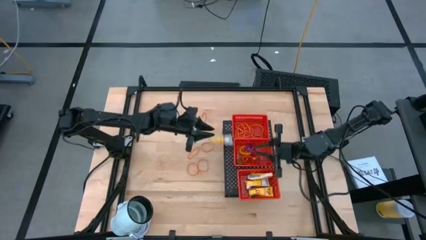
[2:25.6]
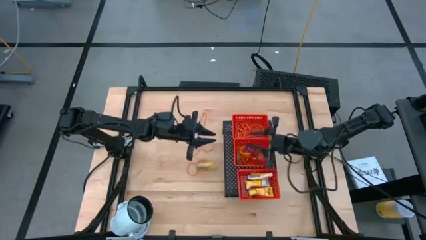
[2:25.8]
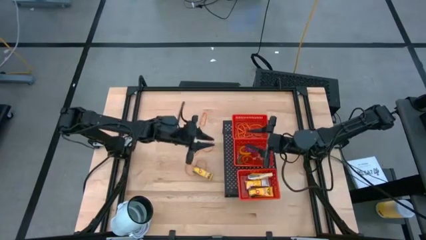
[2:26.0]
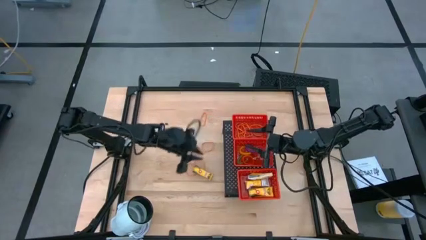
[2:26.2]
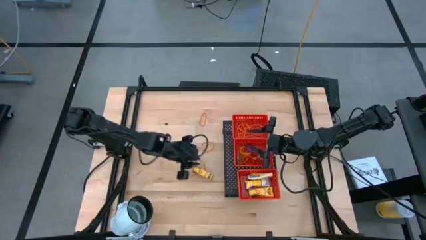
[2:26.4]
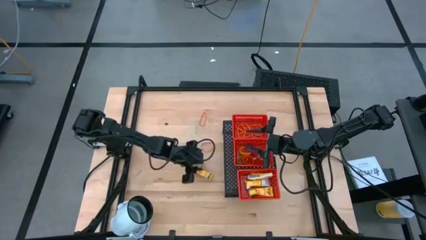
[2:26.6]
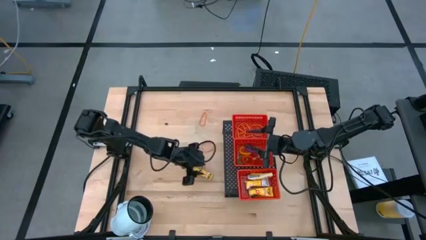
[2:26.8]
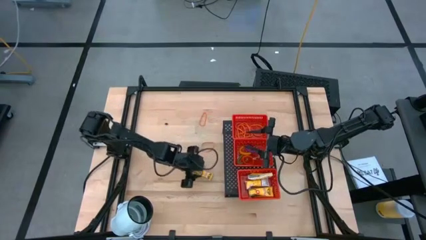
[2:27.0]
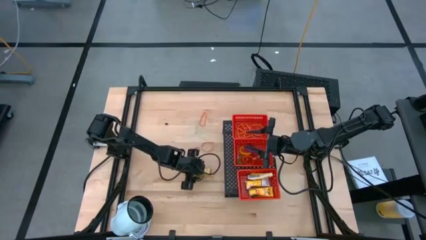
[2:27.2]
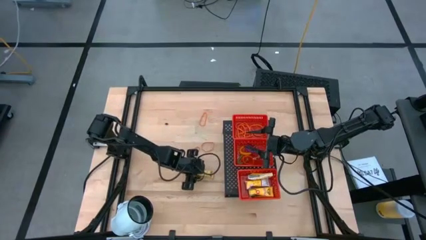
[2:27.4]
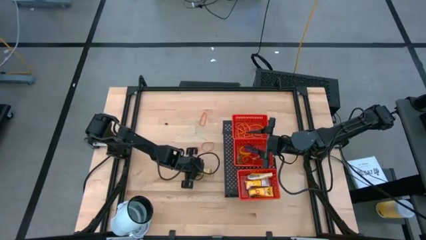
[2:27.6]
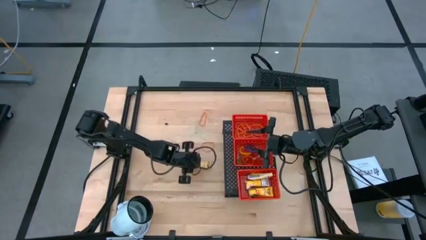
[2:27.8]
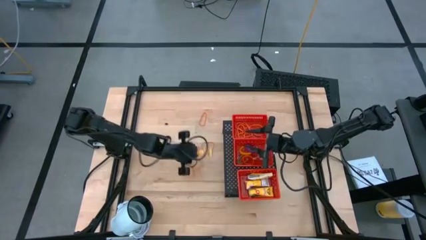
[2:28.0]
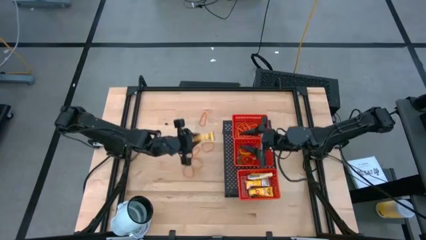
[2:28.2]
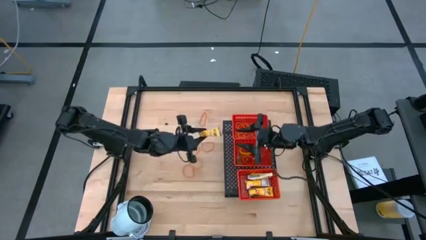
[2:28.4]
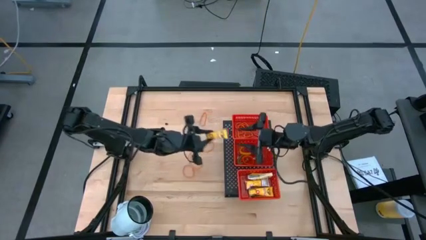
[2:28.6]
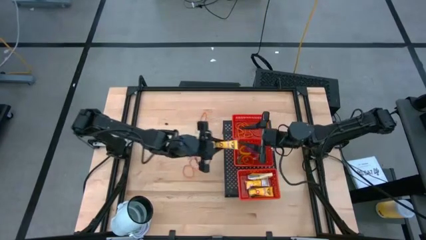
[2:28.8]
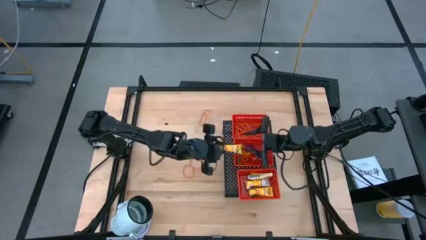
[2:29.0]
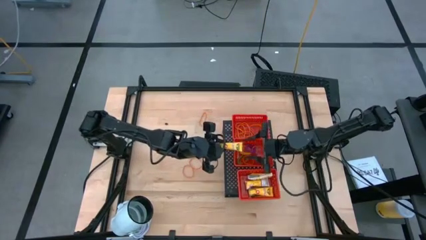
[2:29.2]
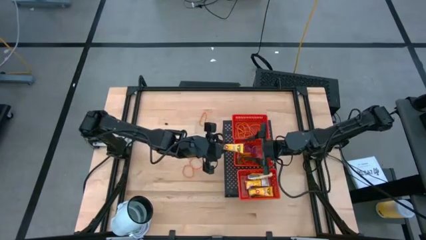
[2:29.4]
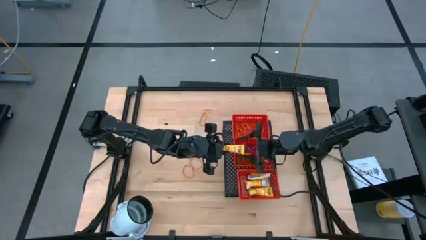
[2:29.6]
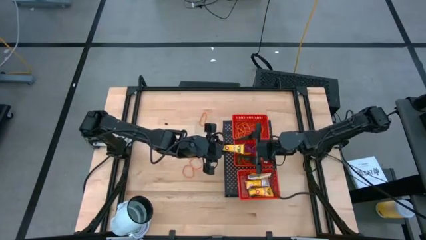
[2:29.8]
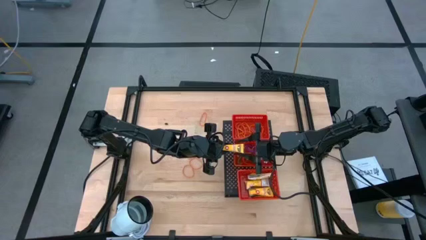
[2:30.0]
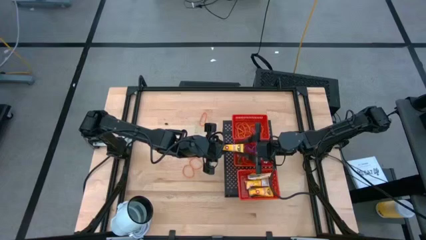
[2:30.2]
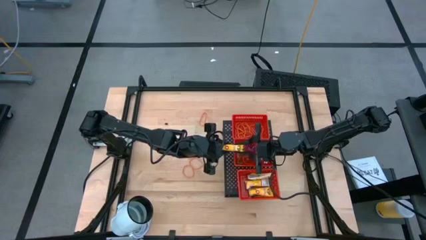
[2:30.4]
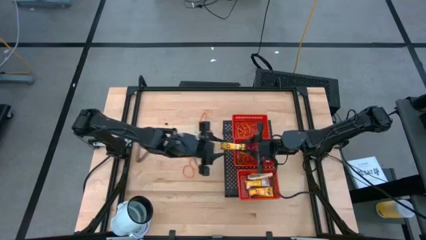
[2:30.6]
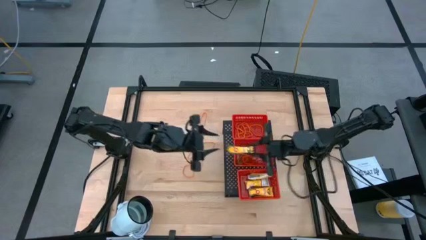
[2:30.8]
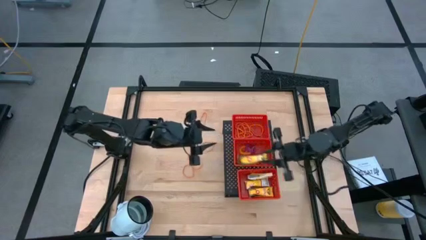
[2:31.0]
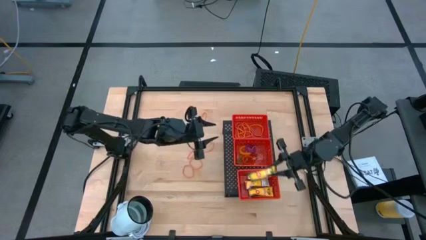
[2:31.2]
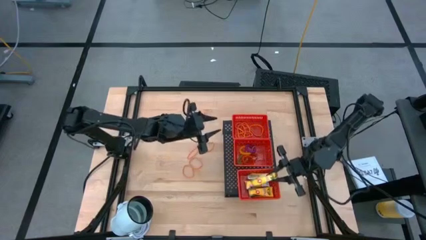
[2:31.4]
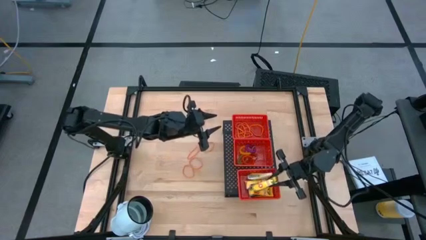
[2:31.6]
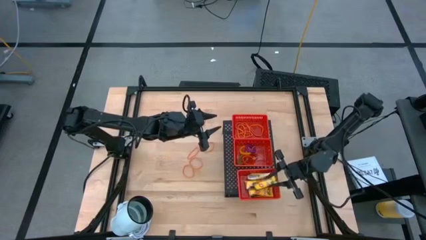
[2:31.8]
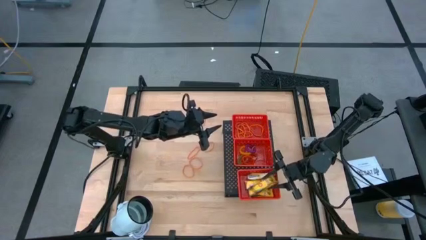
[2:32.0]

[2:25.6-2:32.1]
Task: Pick & Place Office Desk Supplies
Put the yellow pack of crayons into the bottom red bin on the shelf

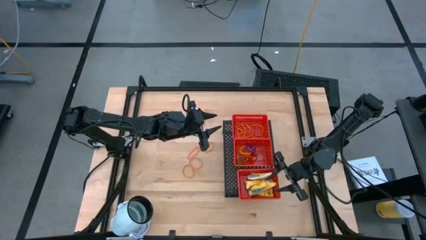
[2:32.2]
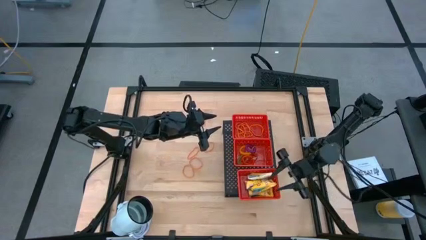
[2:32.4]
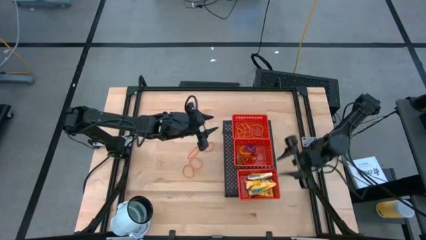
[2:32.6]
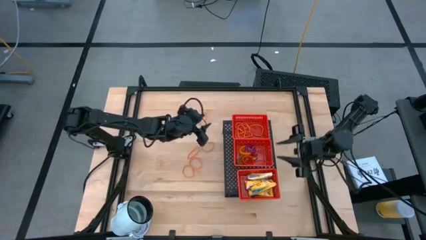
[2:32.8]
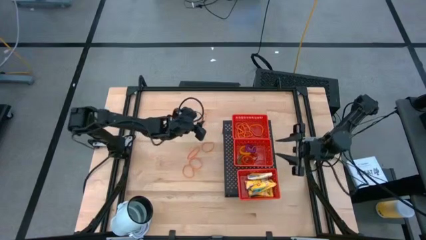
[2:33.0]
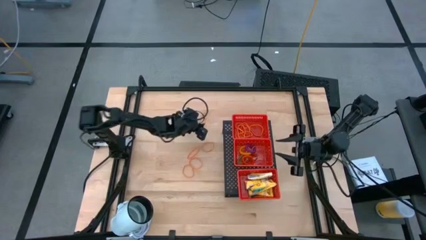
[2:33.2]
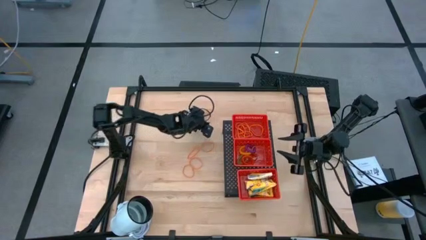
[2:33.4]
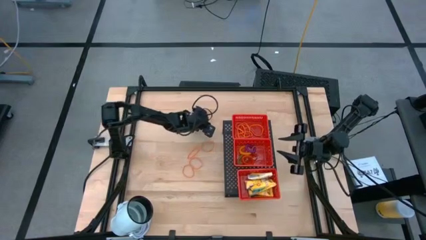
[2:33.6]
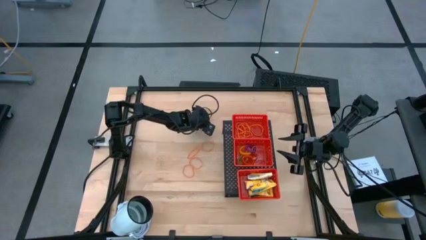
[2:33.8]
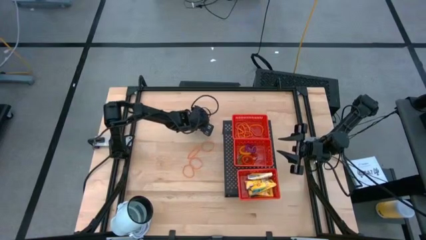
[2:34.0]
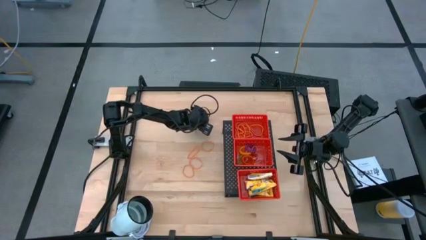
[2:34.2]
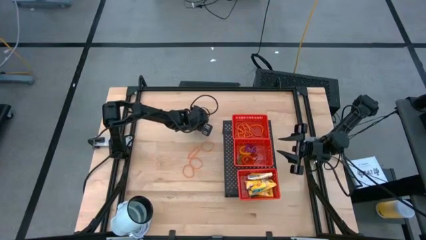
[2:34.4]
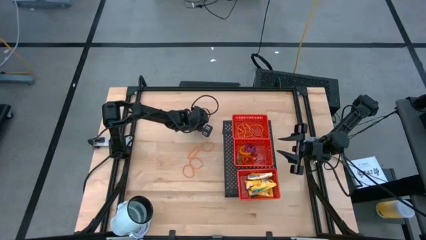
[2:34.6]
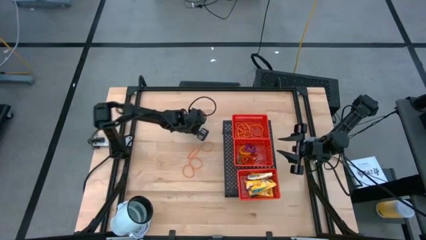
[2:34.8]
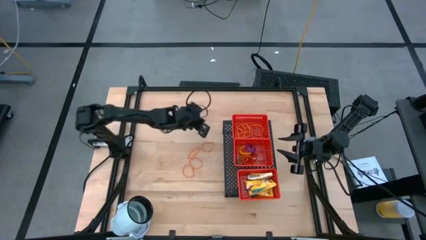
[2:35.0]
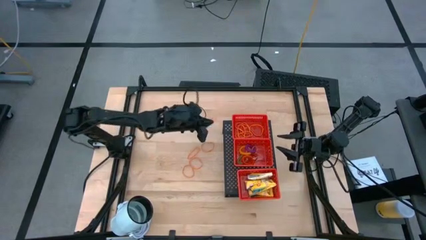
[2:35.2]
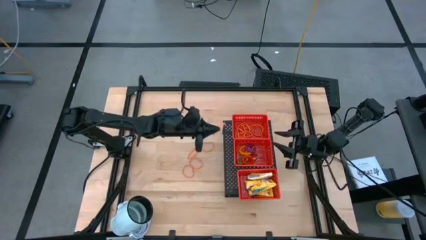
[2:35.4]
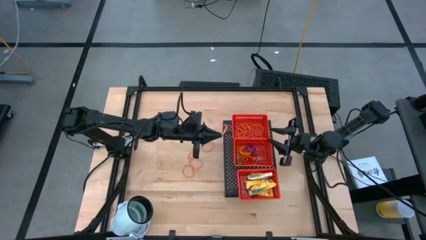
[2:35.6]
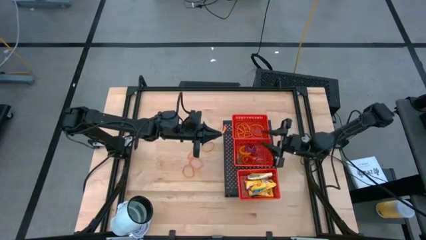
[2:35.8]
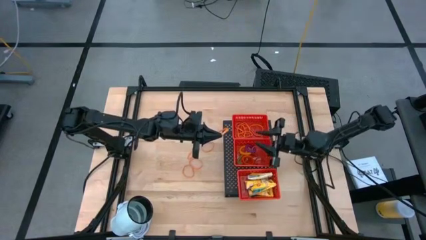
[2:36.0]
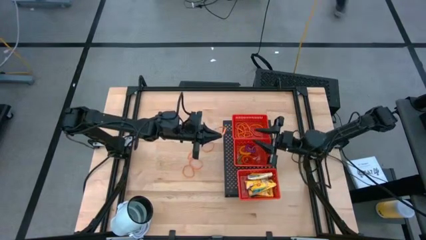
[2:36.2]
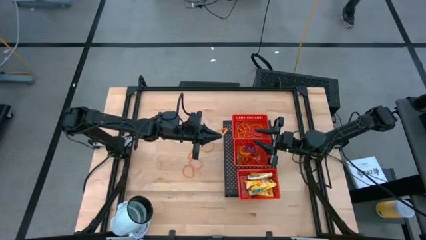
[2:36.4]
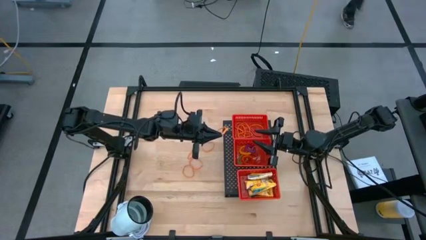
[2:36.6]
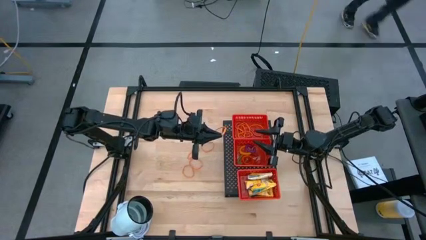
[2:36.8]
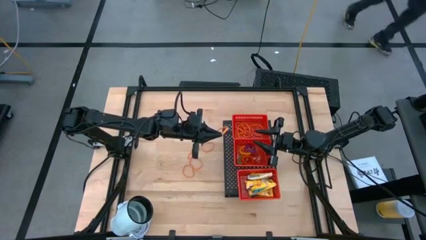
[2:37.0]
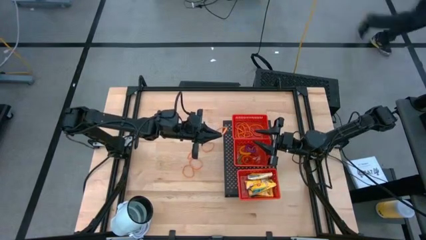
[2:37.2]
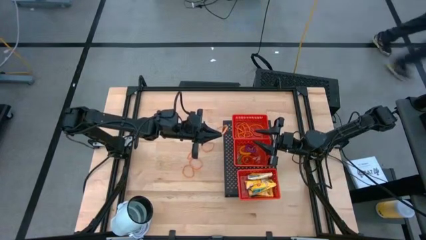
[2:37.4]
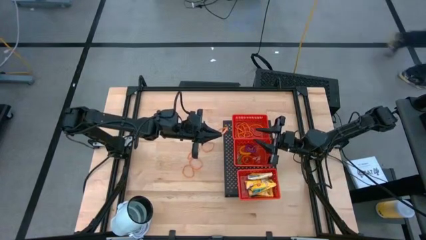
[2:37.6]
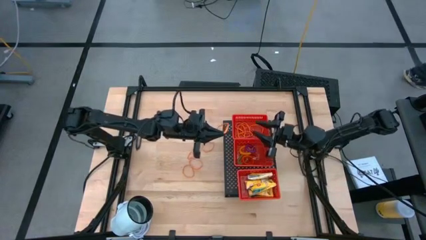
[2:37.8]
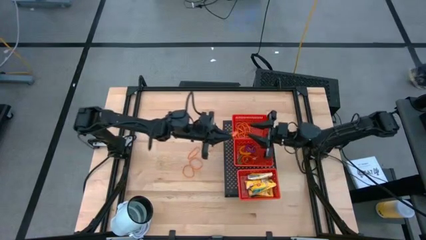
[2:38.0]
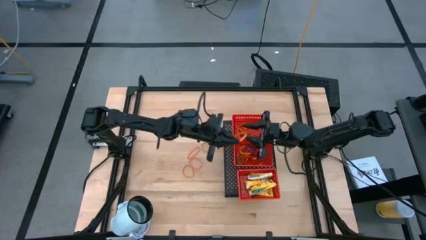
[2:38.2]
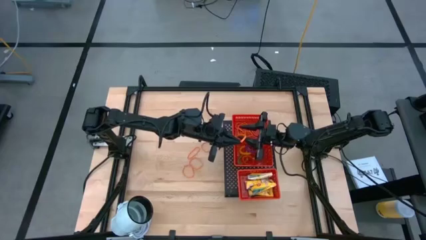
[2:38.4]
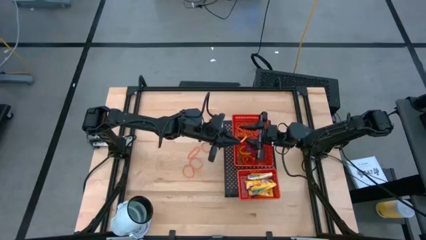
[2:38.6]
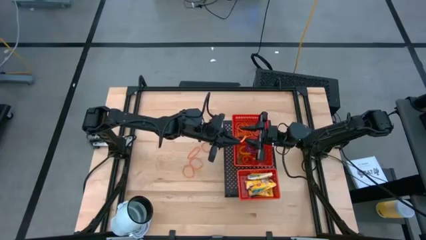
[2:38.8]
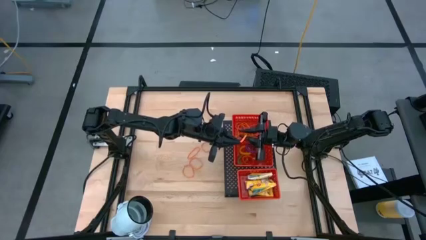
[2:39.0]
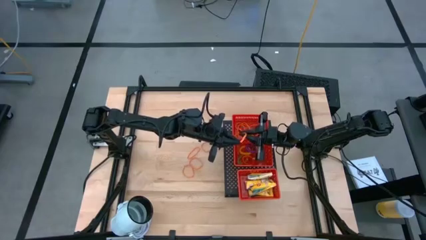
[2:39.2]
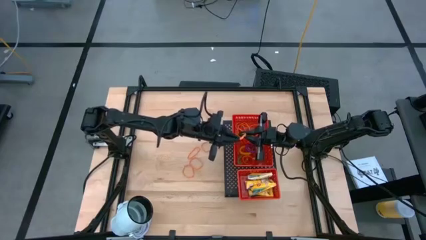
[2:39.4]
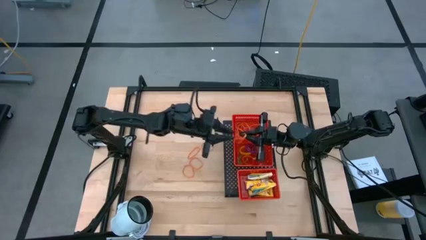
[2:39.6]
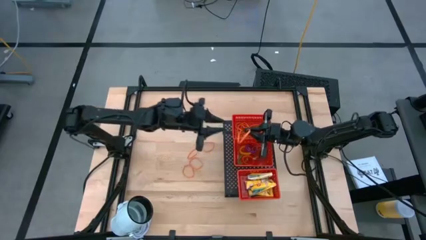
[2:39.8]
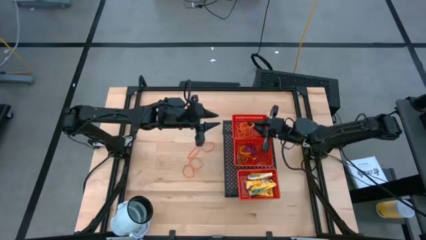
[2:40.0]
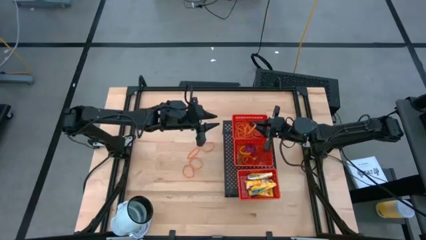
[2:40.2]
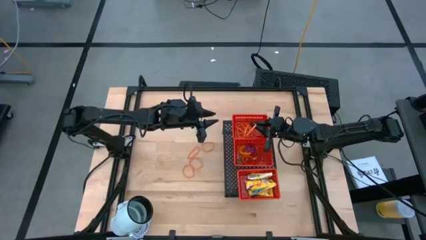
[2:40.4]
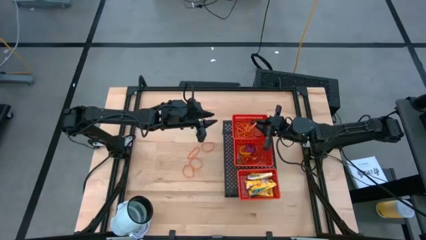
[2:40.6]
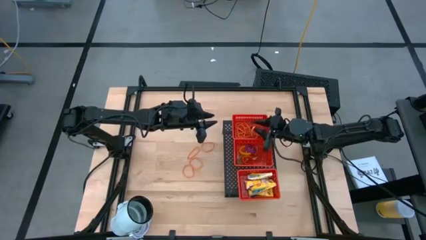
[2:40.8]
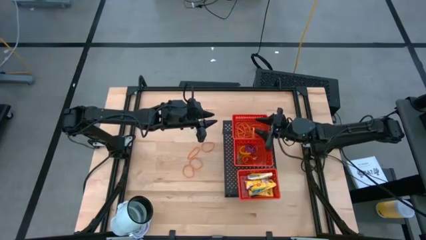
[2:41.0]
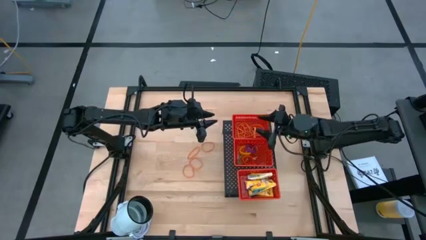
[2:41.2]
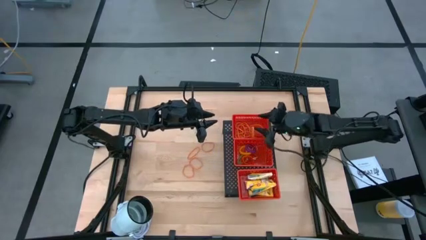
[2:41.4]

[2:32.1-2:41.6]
Put the orange rubber band into the top red bin on the shelf

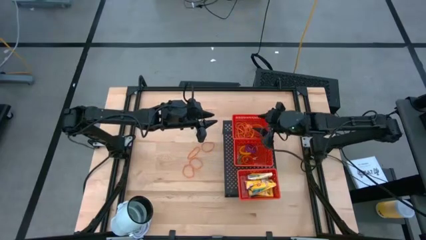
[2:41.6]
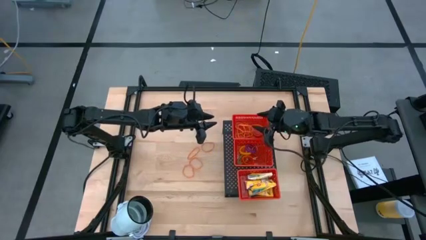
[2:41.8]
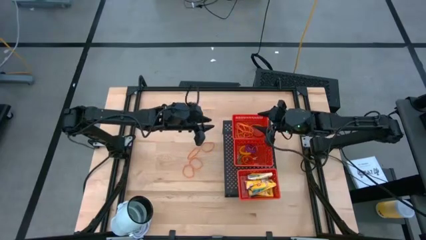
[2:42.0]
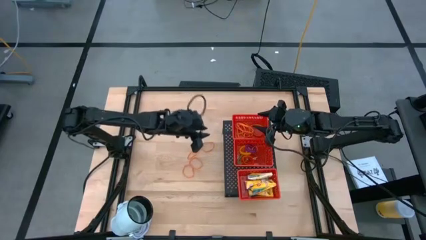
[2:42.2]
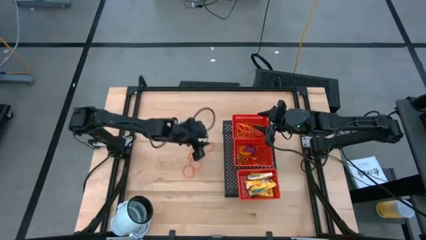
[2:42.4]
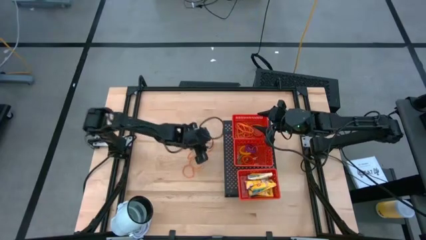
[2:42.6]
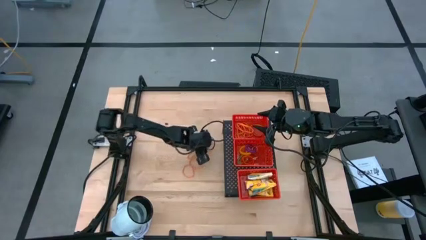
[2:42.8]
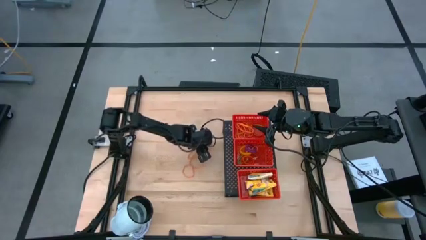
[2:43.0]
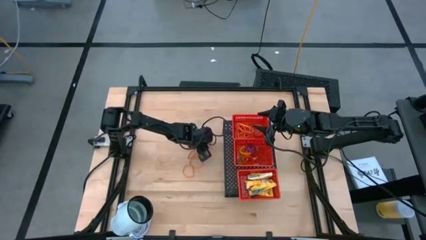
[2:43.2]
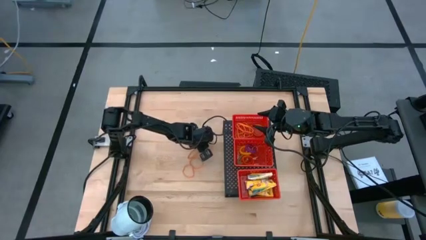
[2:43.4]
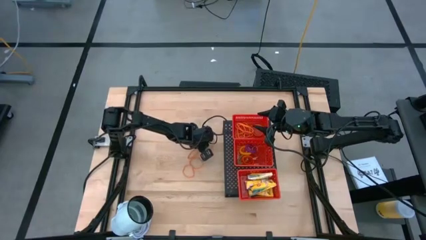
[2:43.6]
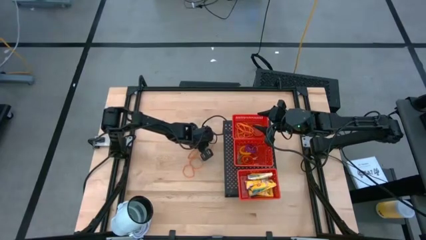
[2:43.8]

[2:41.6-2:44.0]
Put the orange rubber band into the top red bin on the shelf
